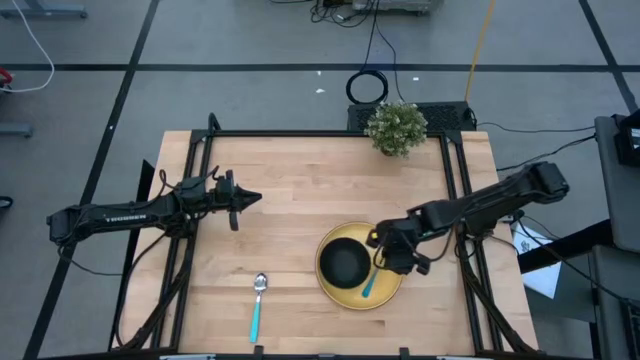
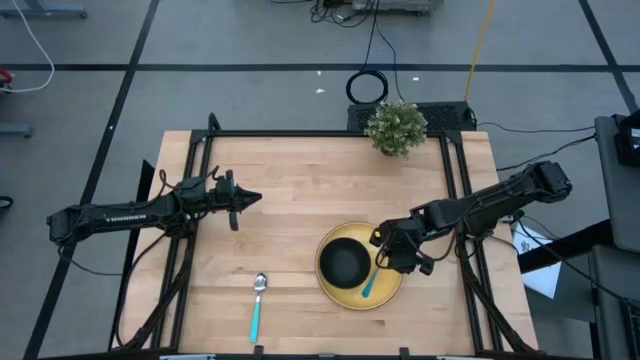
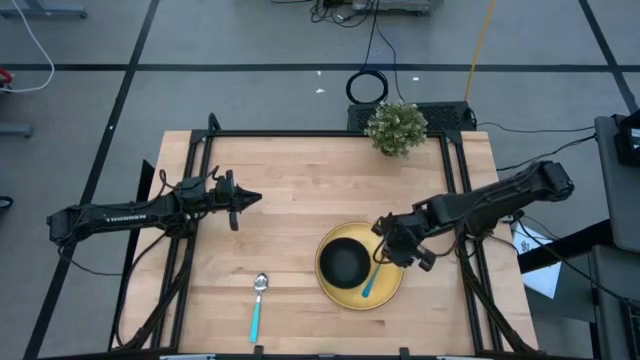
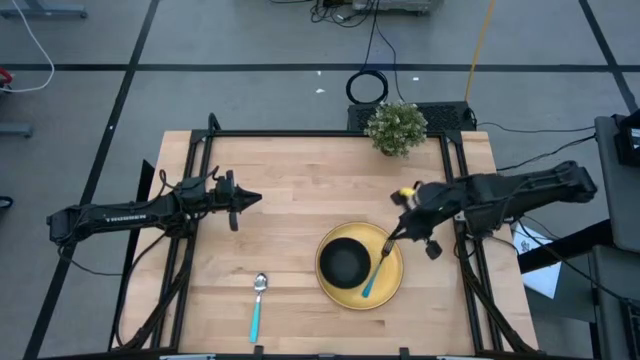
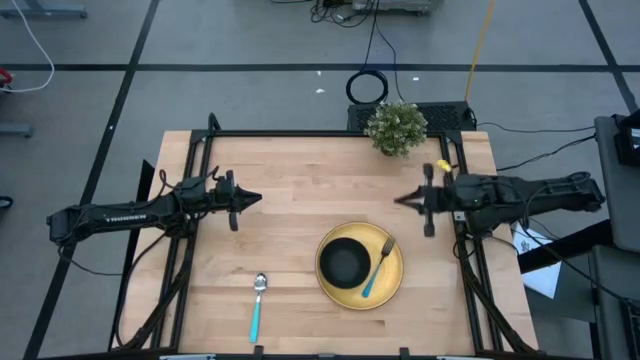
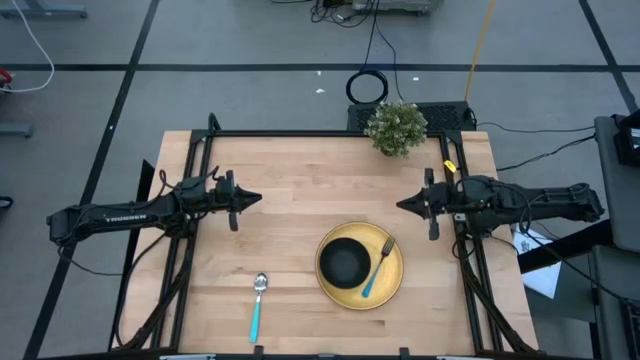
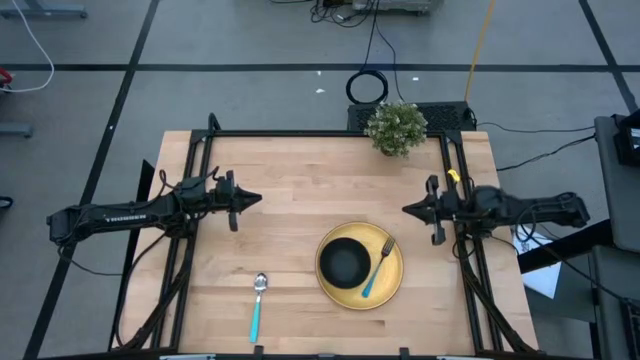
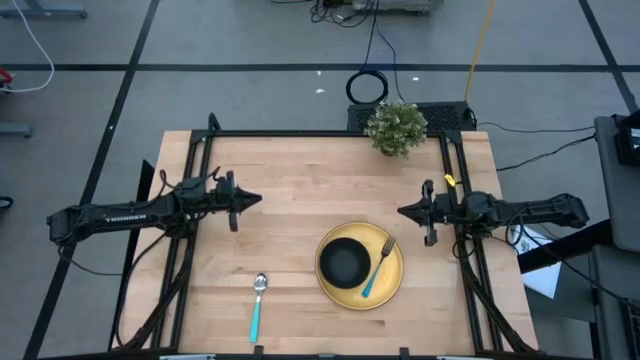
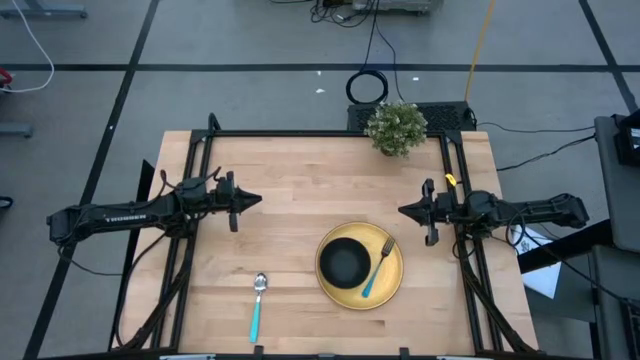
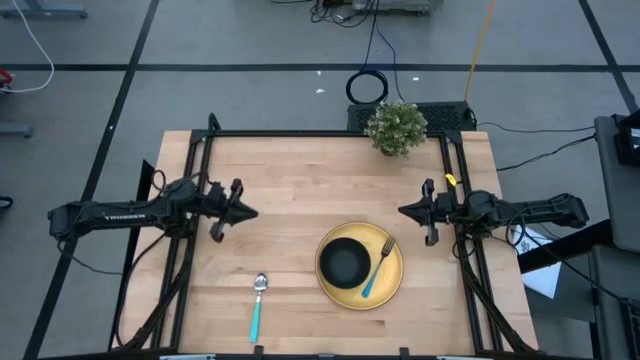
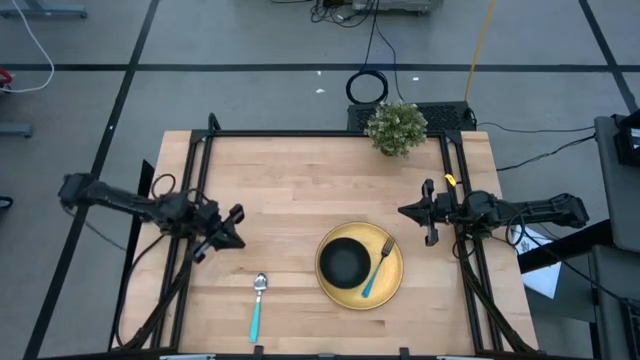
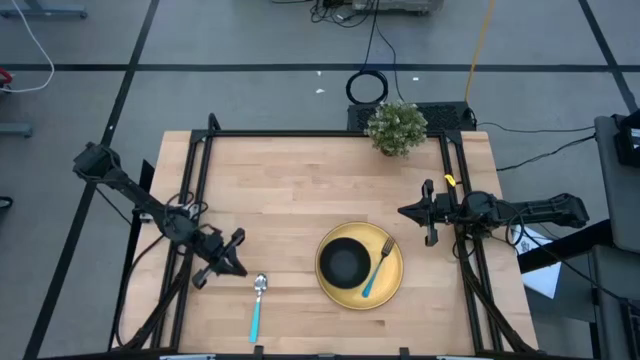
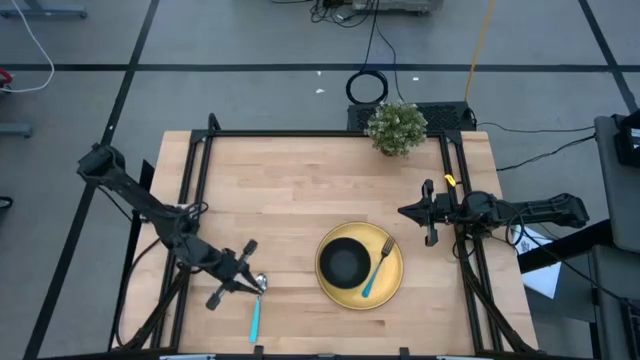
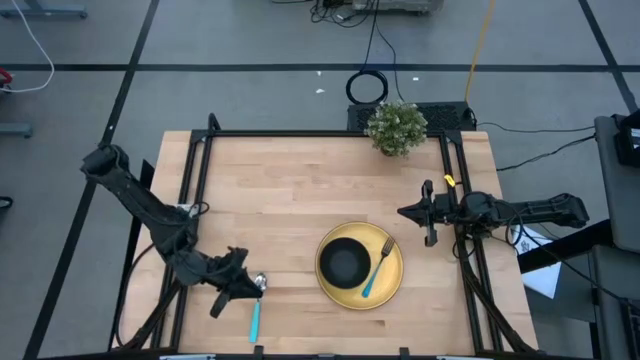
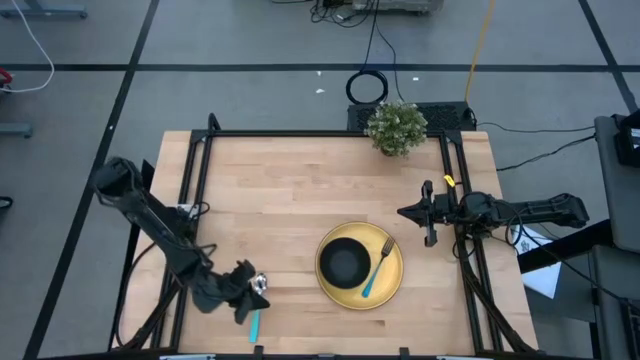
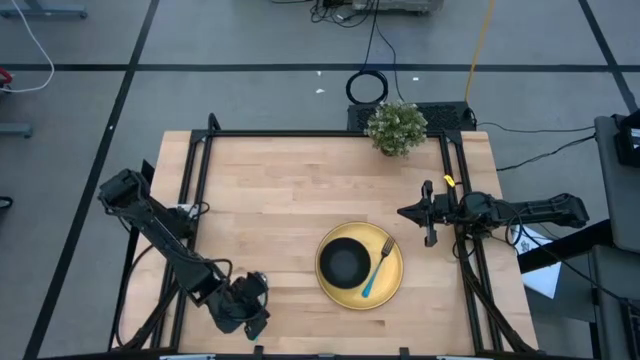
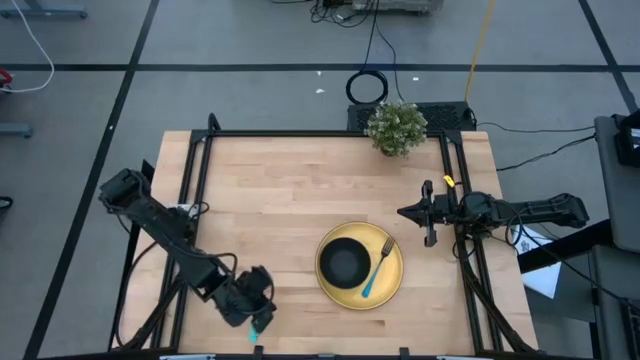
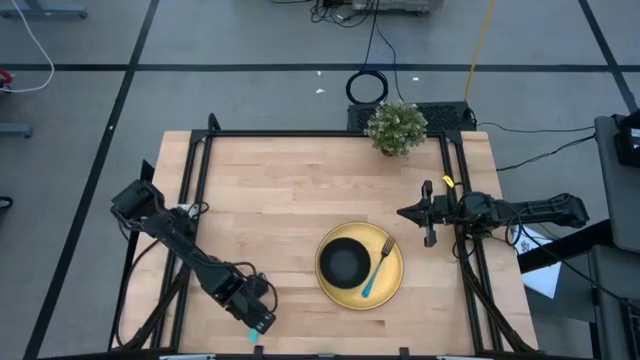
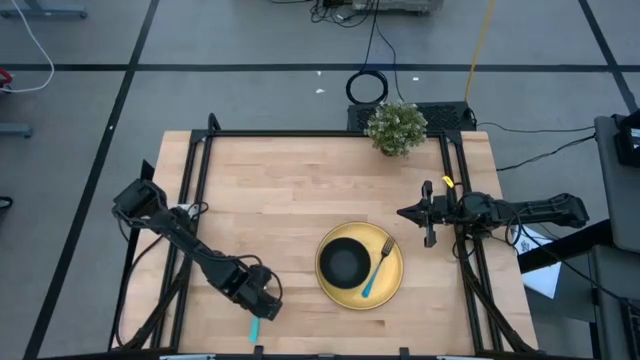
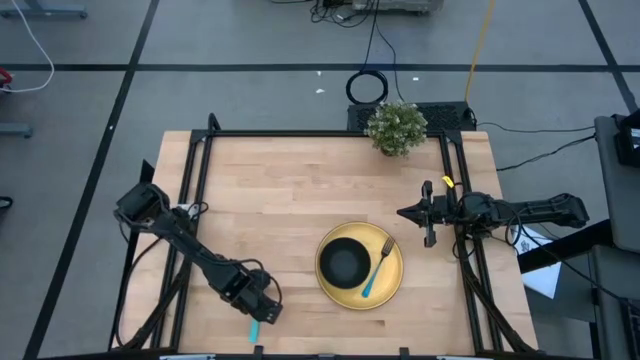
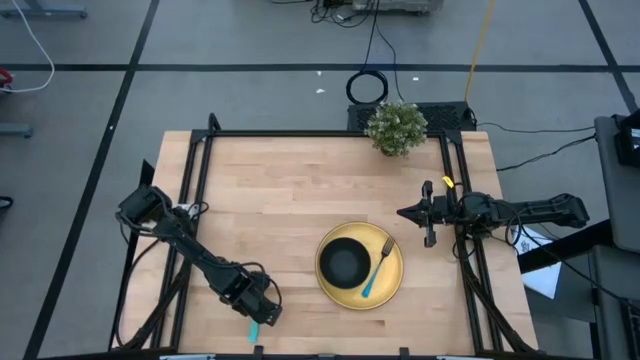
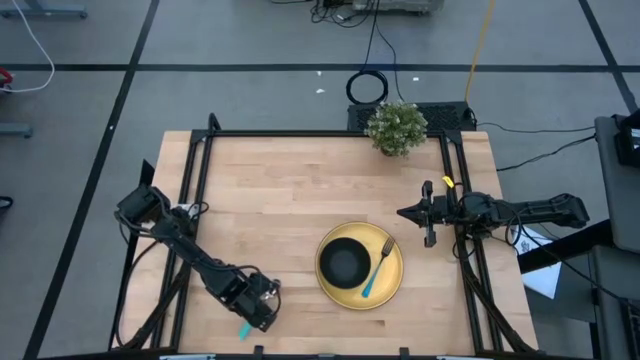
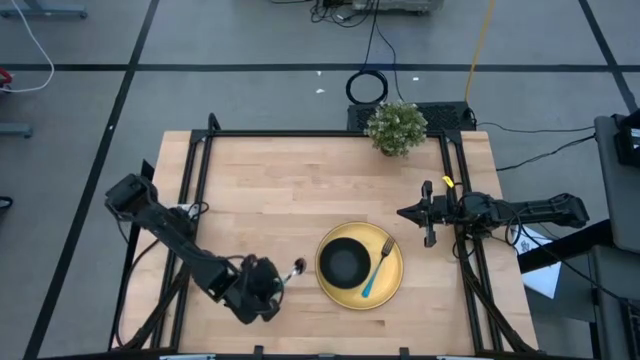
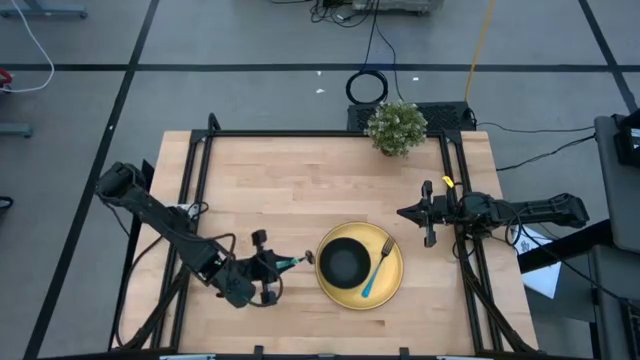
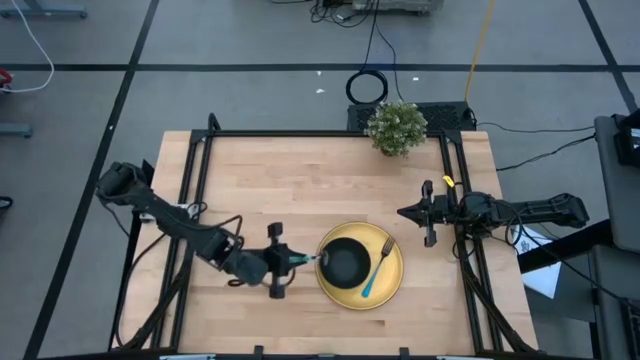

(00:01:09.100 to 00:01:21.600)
Task: Set table place
Put the blue spoon in the black bowl on the yellow plate

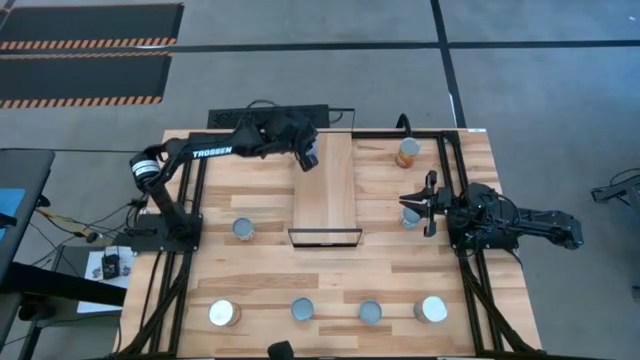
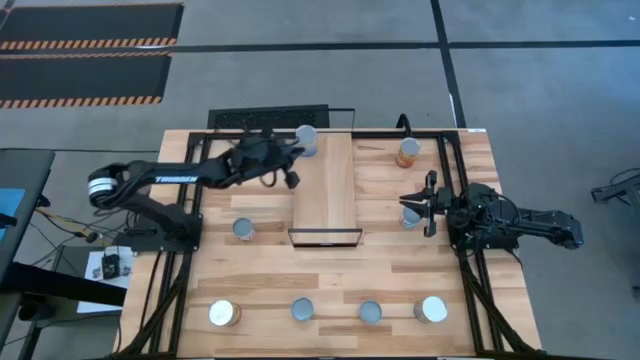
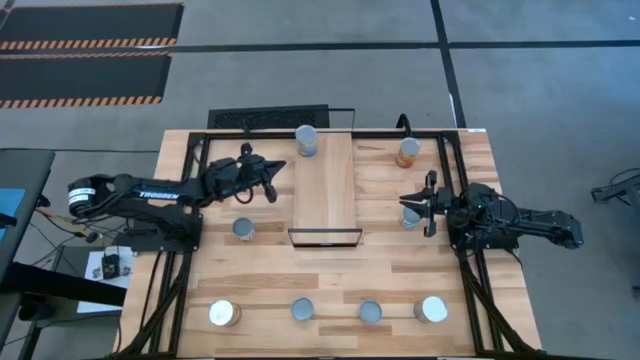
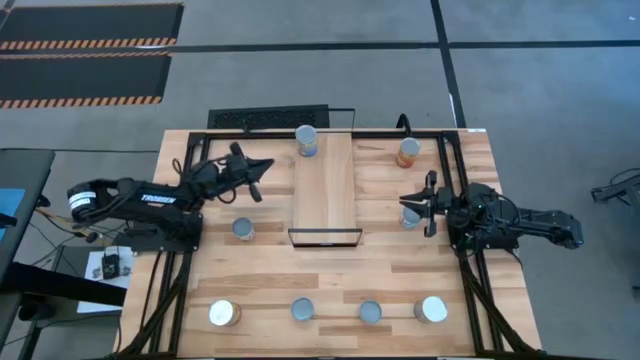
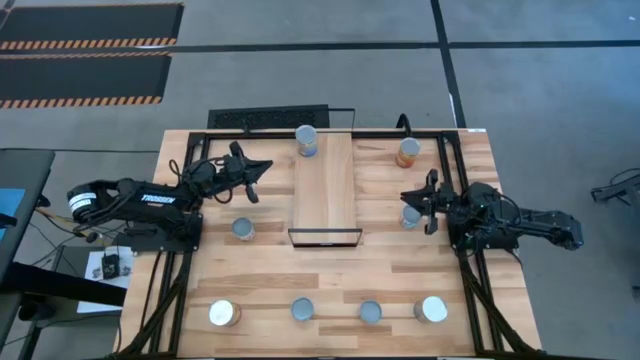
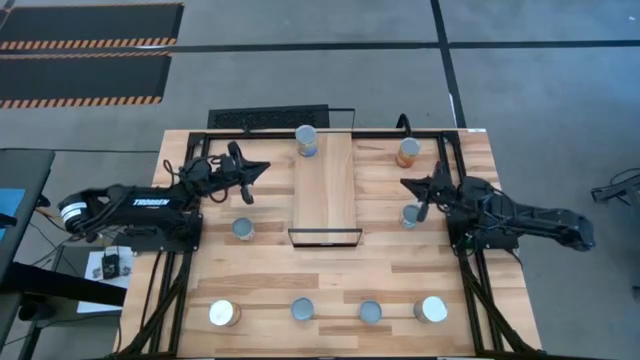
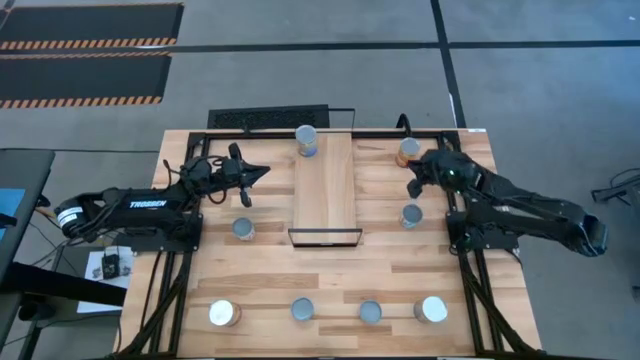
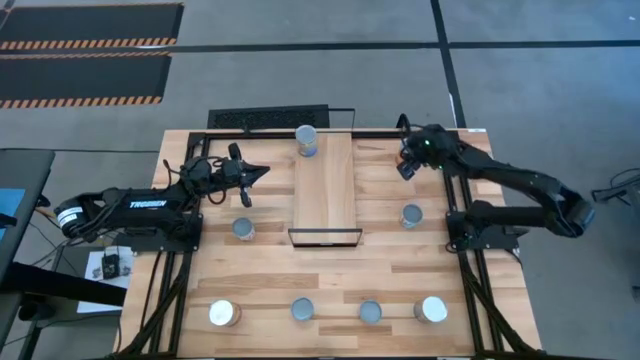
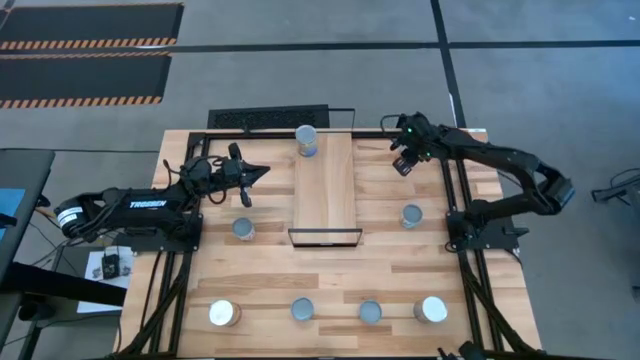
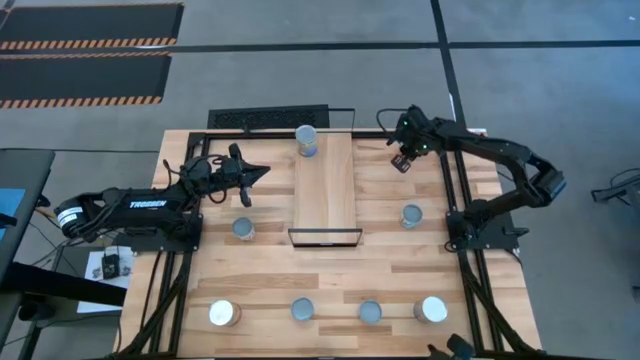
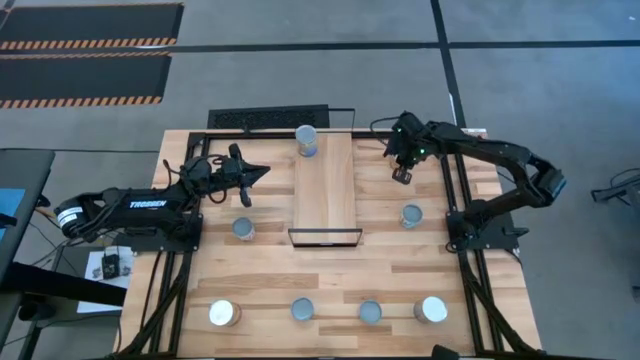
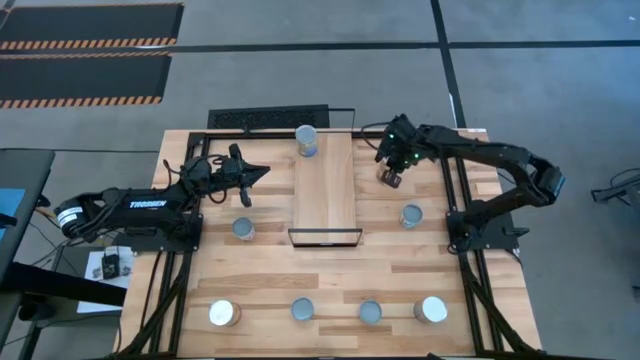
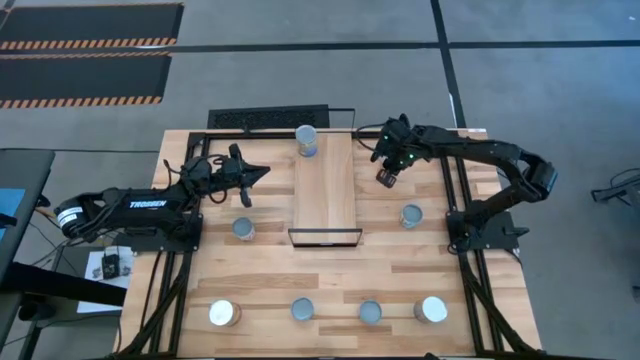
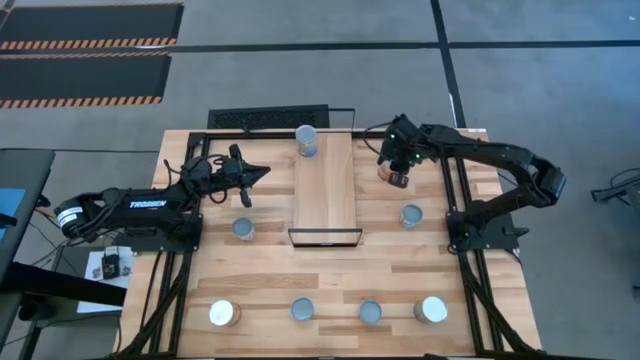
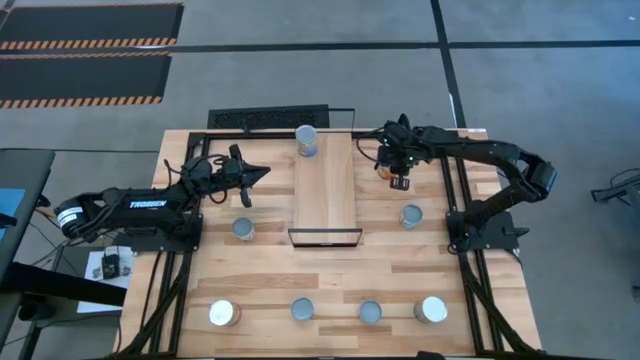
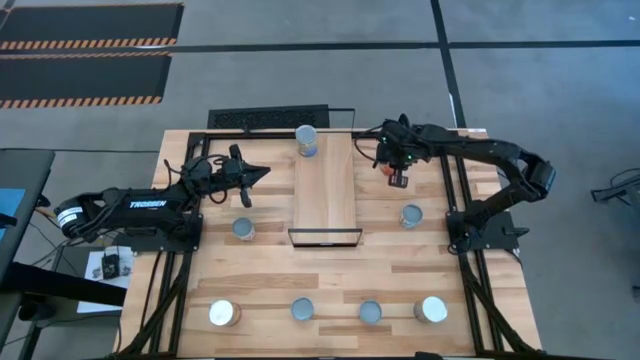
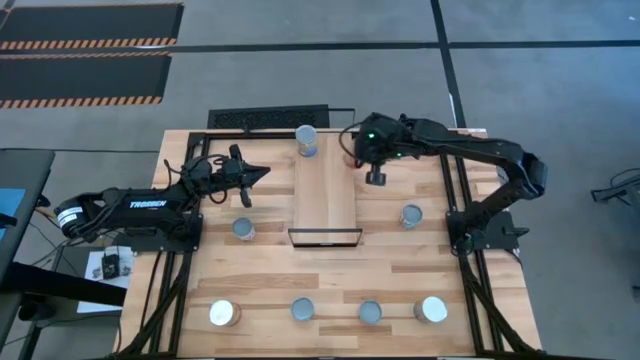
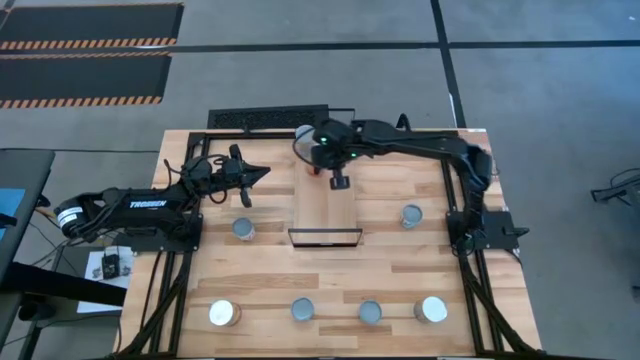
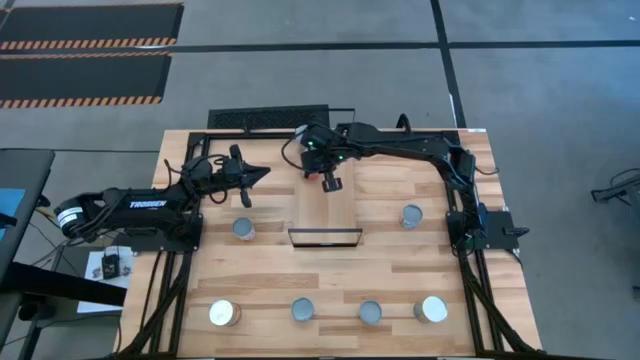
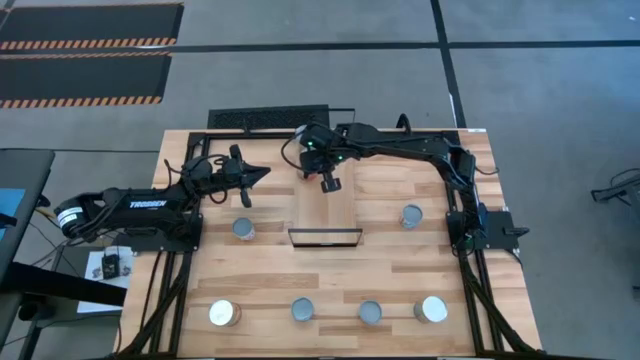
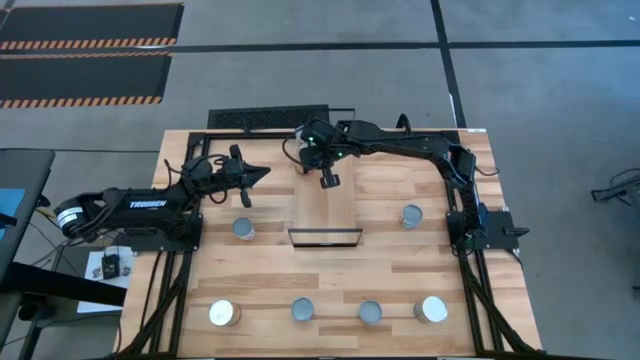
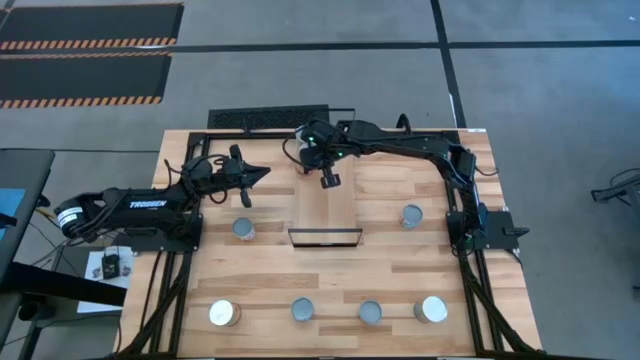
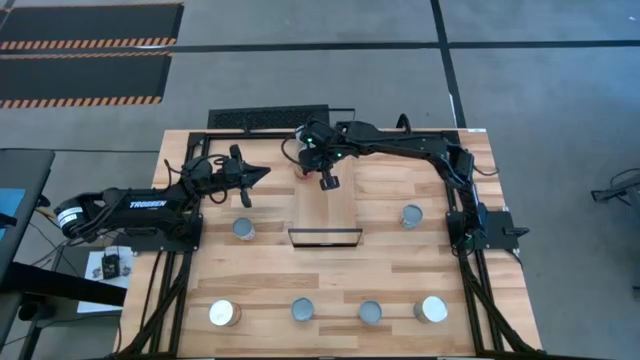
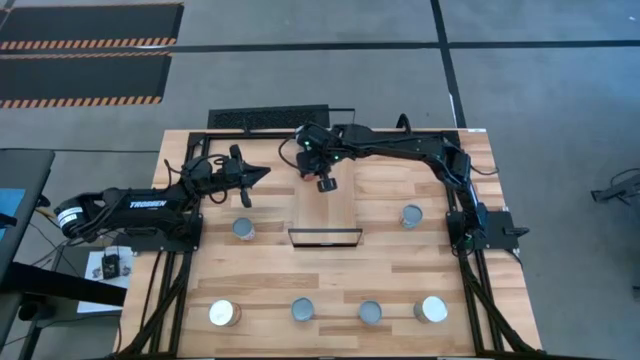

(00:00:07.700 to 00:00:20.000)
Task: Pick and place cans onto a shelf
Put the top canned corn on the shelf
